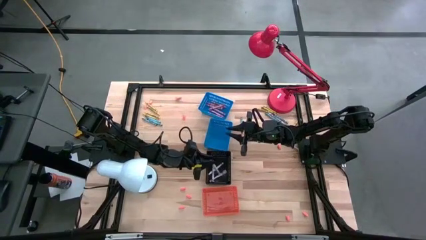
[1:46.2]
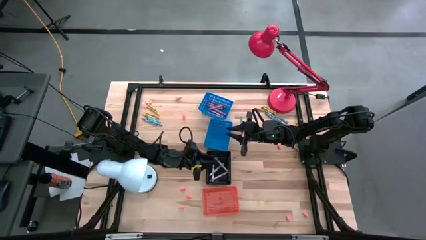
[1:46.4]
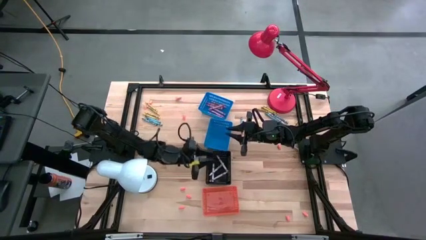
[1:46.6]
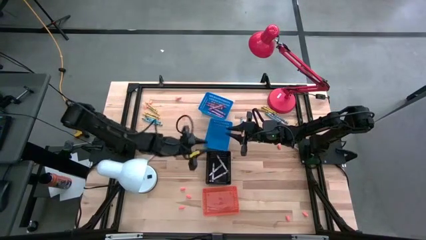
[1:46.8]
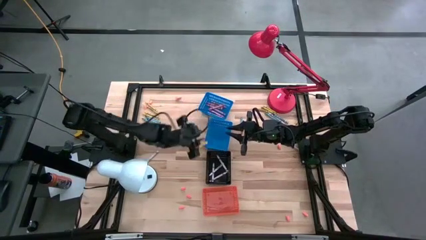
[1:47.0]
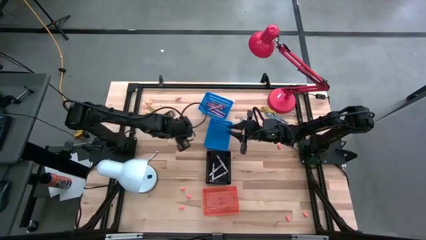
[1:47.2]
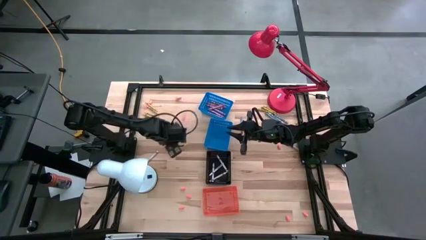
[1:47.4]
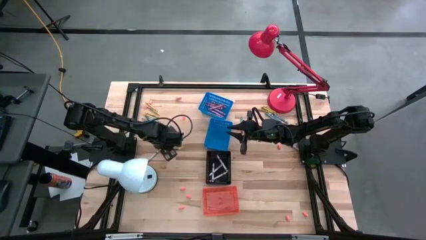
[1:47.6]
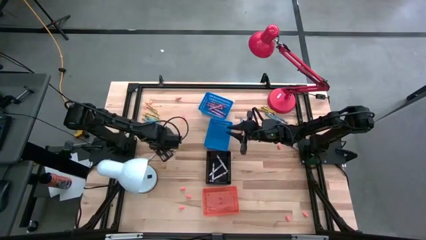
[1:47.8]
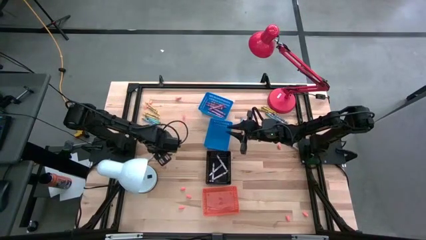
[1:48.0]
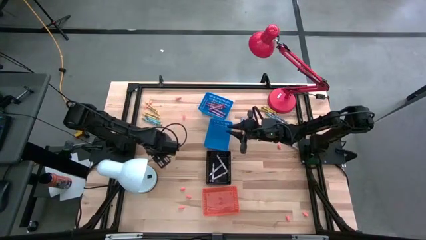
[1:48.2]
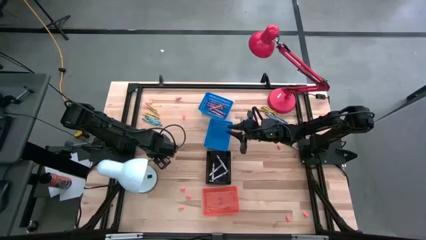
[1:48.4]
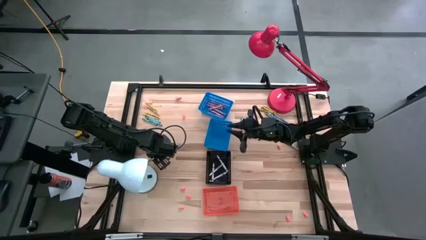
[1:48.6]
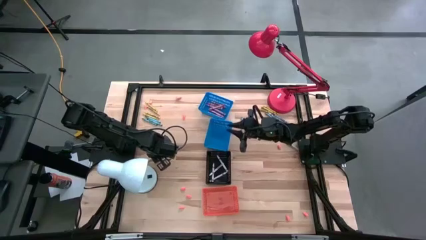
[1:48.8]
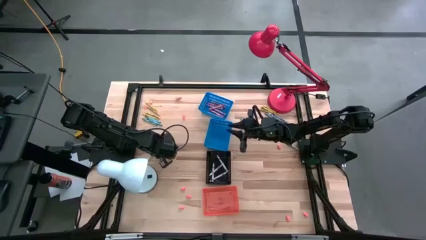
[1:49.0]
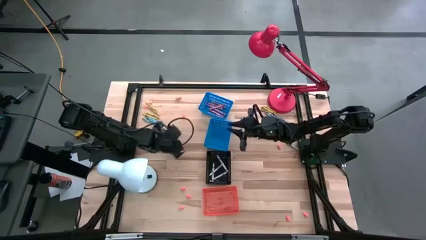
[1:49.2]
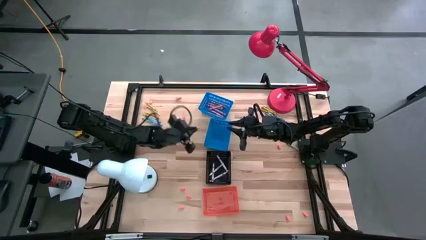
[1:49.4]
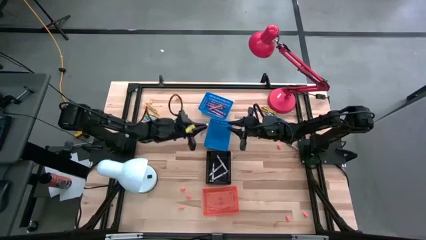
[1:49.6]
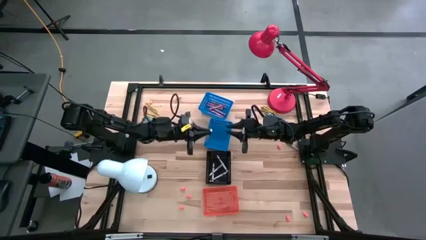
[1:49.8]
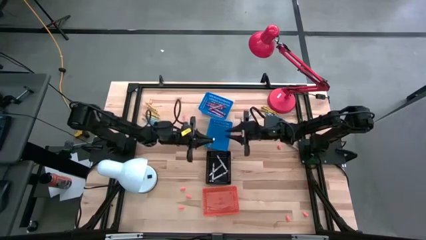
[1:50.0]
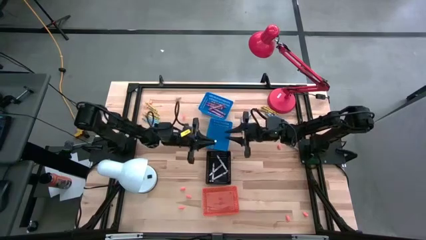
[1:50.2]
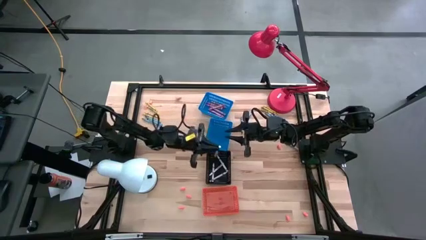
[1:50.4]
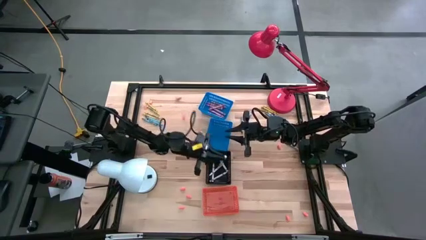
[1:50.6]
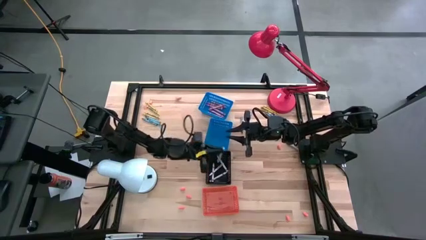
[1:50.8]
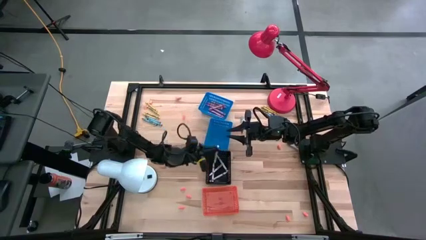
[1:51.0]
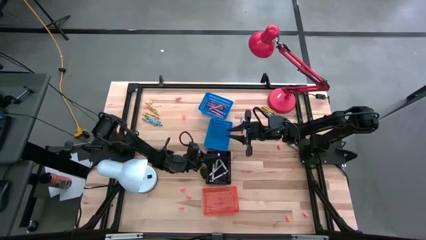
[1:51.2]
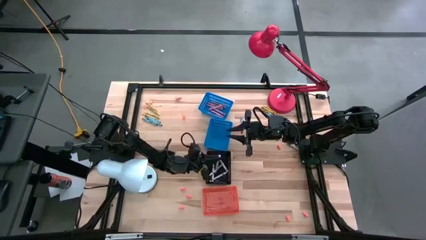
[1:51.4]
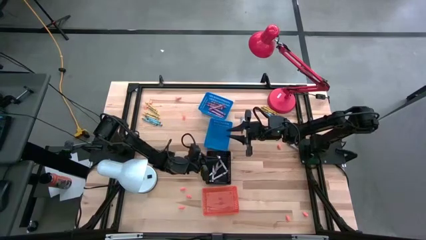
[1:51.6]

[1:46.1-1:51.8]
Task: Sort crayons
Put the white crayon into the black bin

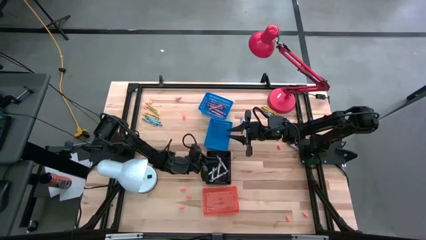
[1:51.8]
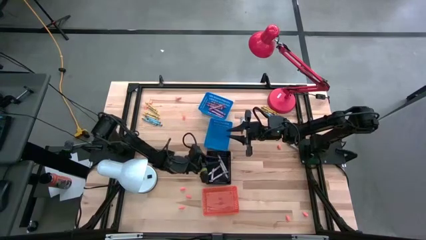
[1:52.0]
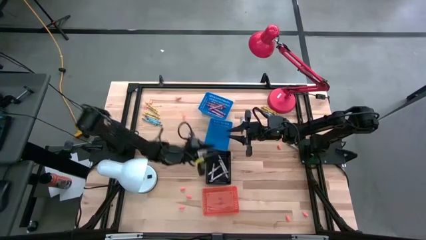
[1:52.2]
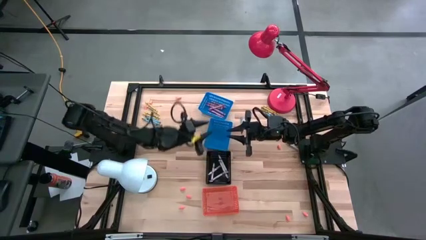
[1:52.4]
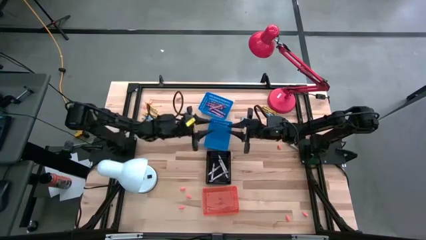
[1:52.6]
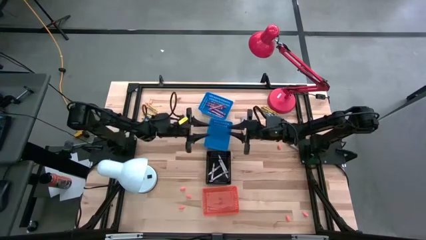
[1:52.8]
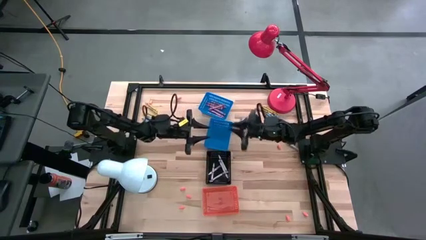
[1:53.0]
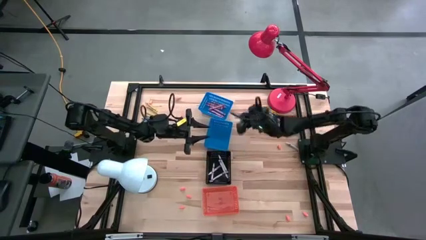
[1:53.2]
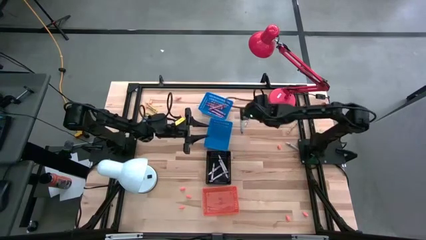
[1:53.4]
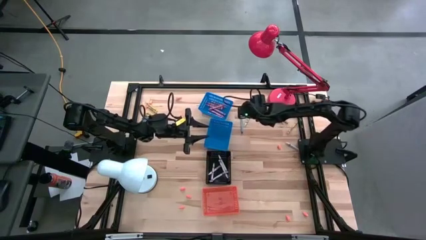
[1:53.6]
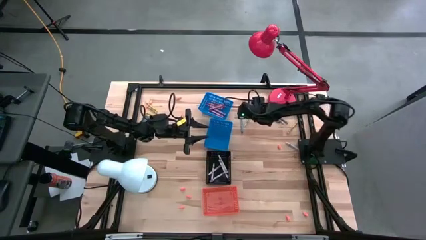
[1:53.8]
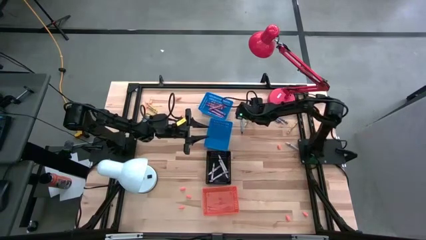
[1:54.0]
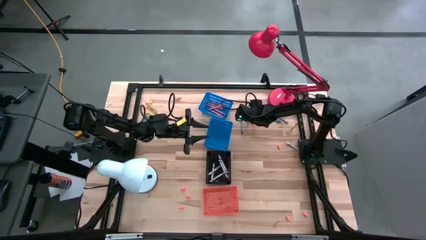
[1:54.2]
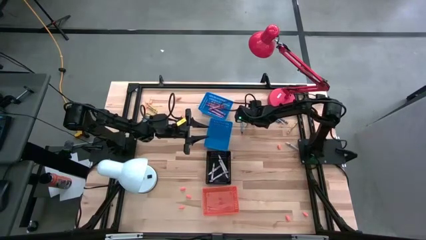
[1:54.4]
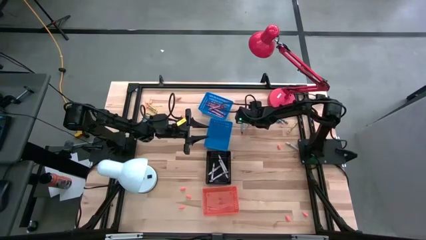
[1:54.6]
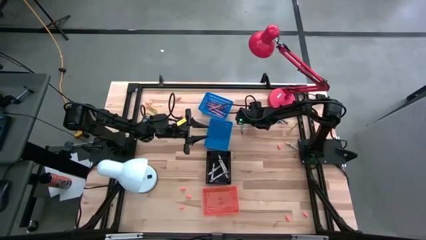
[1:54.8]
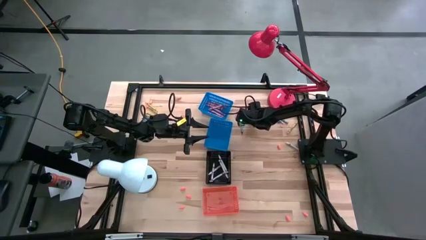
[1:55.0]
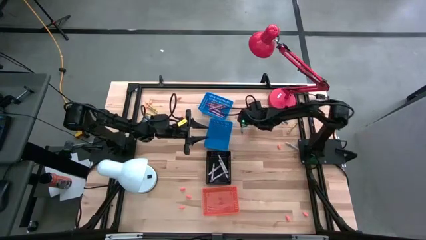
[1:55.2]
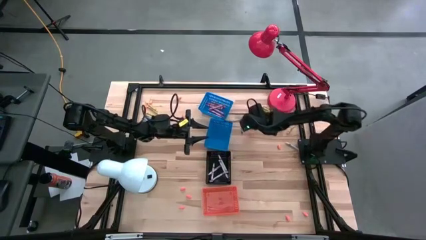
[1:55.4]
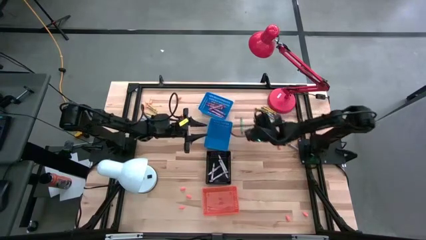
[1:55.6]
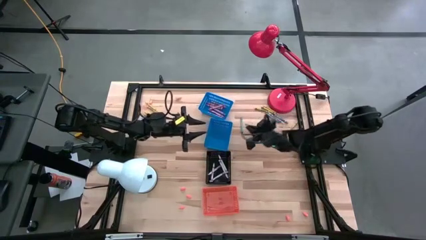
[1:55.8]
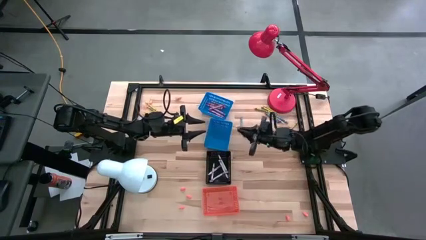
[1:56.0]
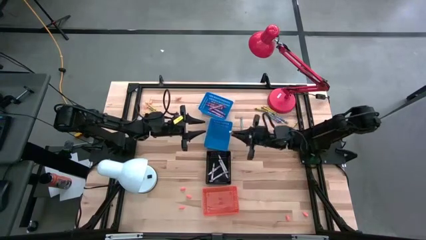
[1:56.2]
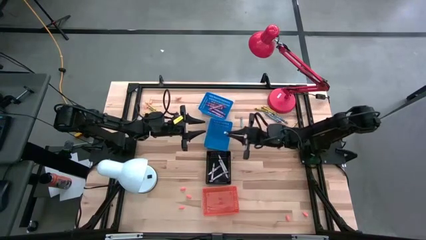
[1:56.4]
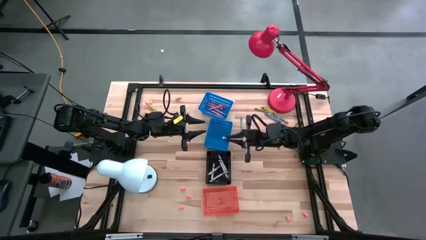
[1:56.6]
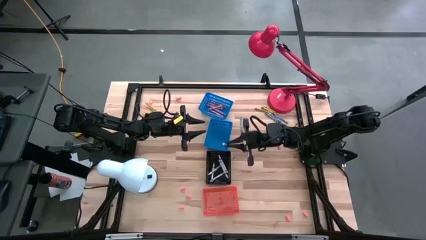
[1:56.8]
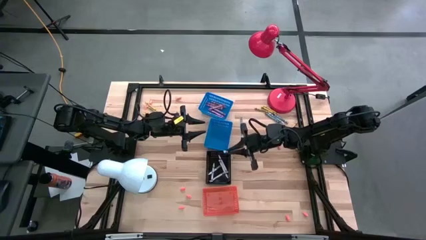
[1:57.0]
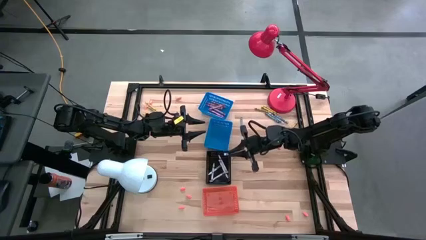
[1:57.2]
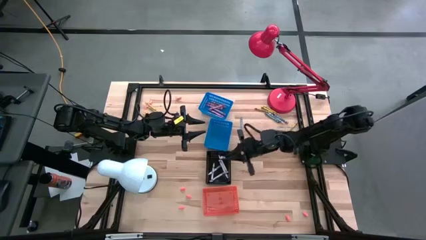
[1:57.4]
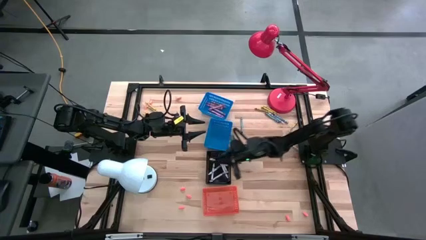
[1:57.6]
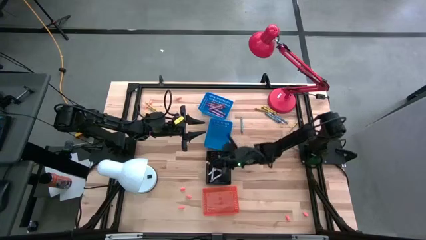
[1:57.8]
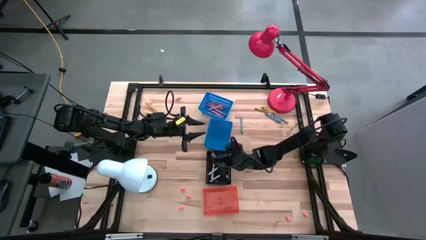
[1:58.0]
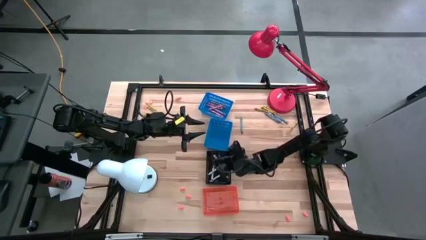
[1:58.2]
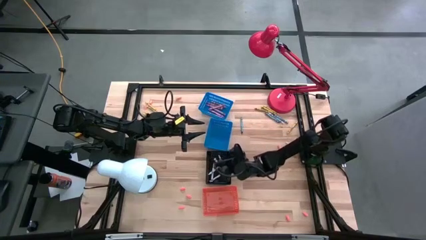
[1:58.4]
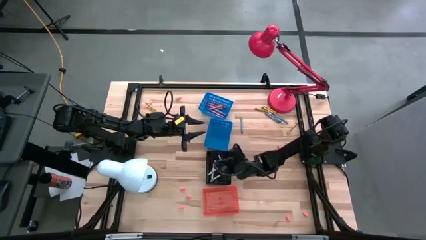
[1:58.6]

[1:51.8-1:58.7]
Put the white crayon into the black bin

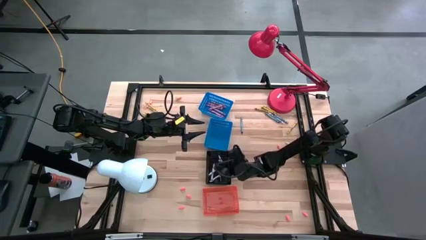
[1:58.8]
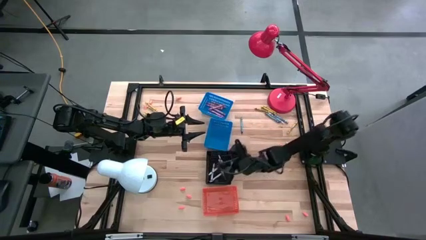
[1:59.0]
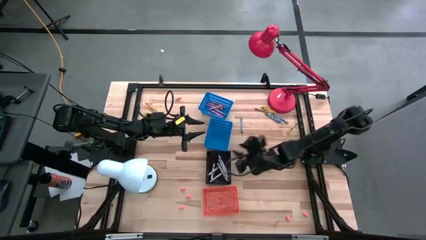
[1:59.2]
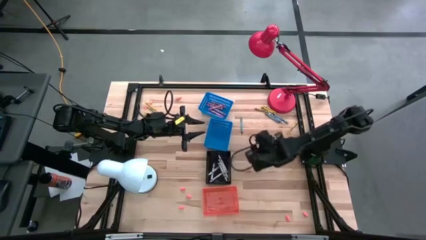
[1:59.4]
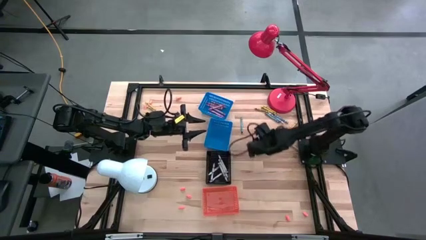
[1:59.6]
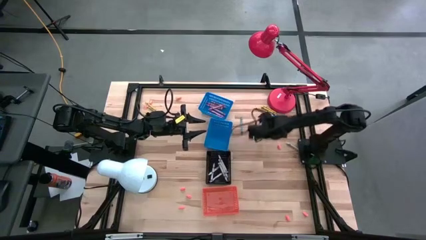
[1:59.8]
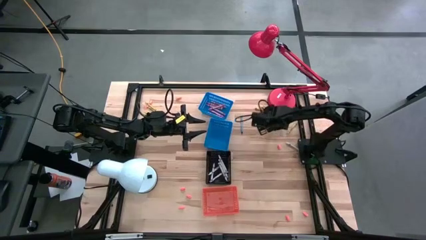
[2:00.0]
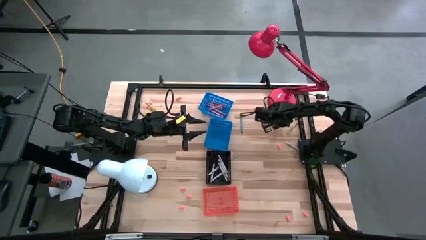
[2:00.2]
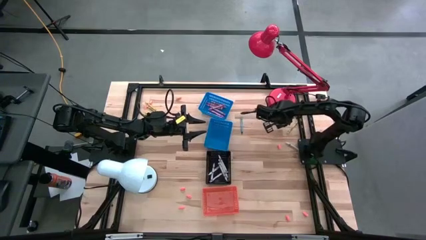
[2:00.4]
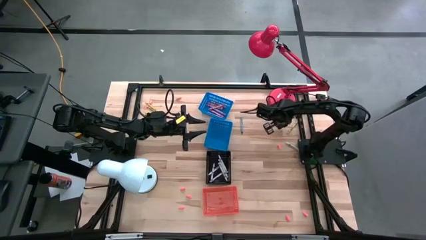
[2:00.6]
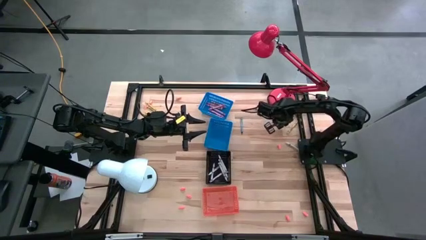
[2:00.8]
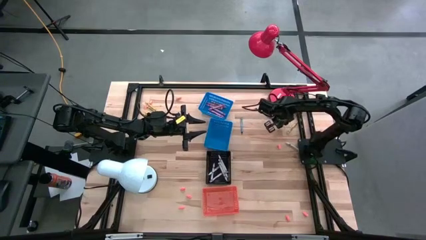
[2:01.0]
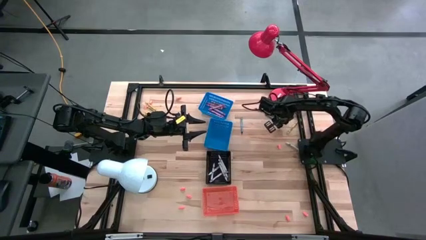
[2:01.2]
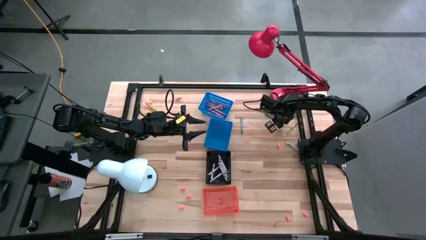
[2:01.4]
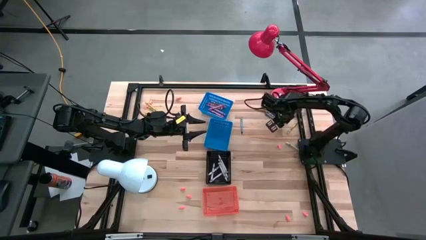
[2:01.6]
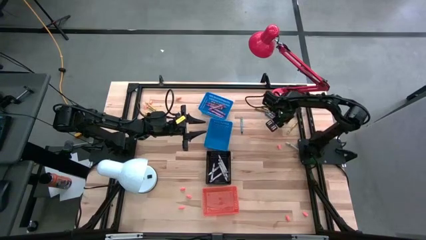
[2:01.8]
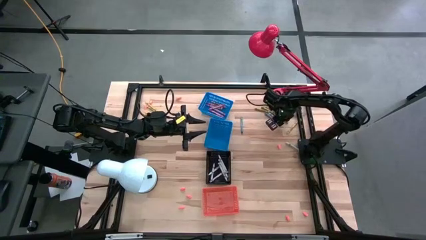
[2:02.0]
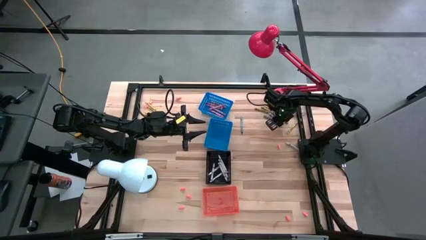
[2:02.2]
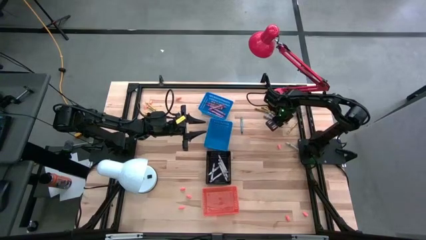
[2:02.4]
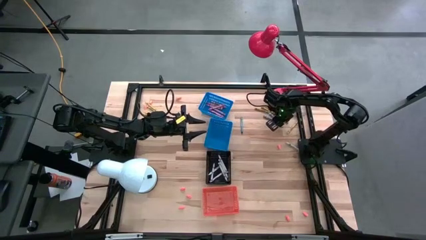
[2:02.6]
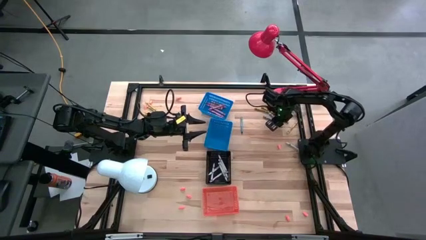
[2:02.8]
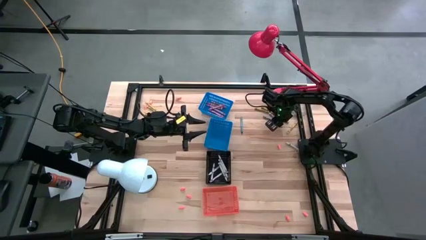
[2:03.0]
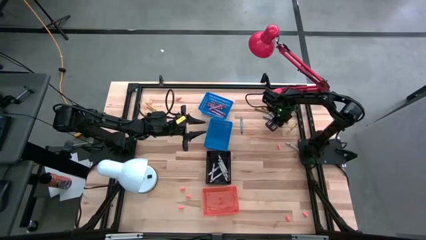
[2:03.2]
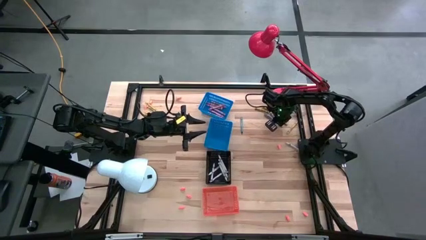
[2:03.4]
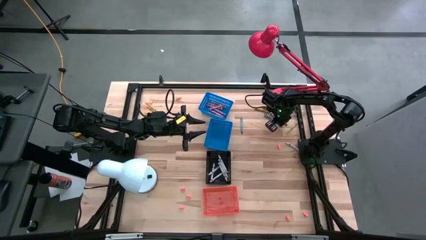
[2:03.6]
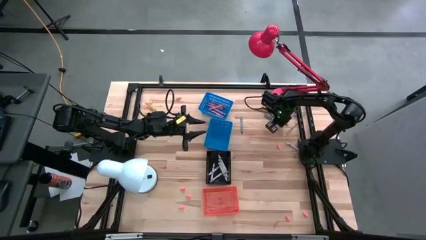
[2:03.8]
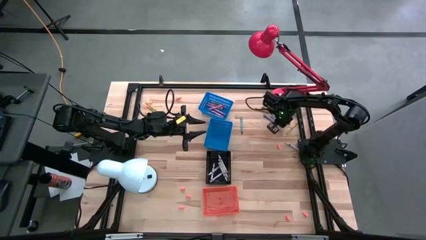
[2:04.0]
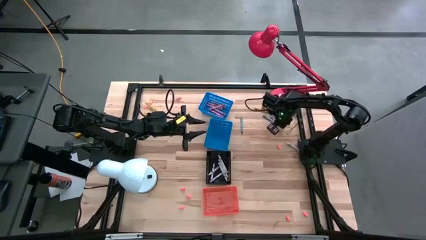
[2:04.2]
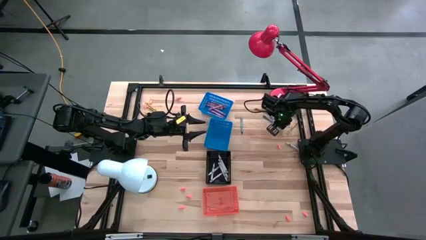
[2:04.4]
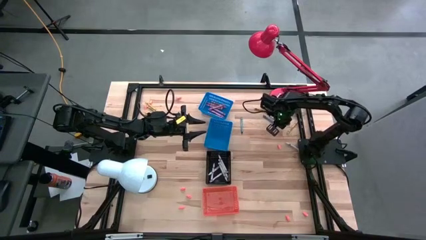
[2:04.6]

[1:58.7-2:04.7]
Put the white crayon into the black bin
